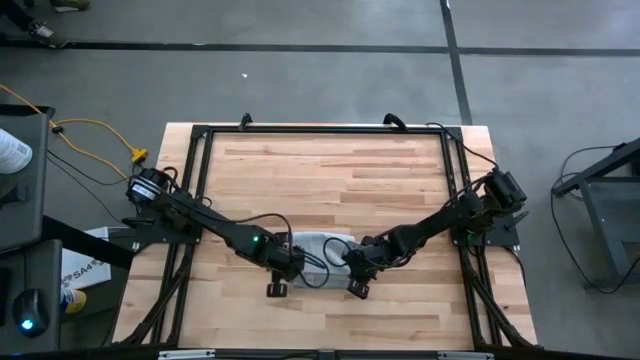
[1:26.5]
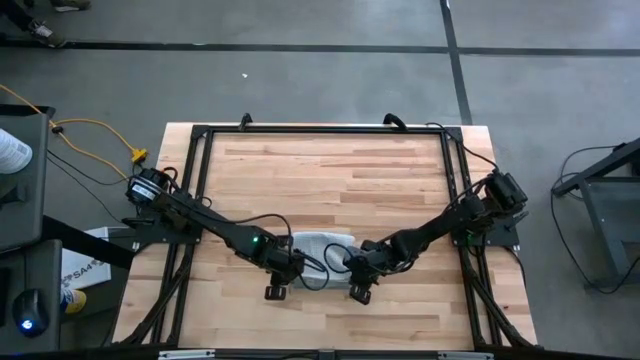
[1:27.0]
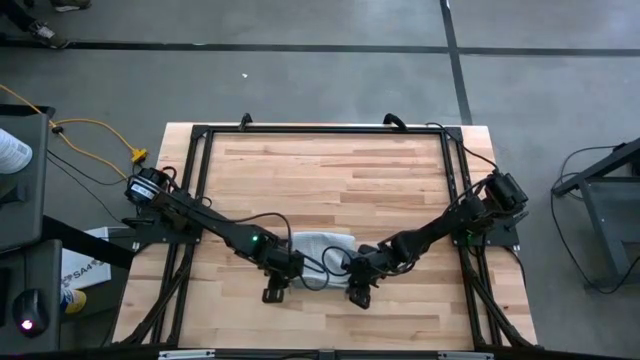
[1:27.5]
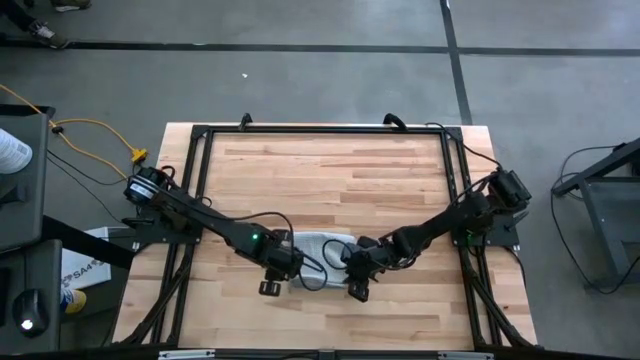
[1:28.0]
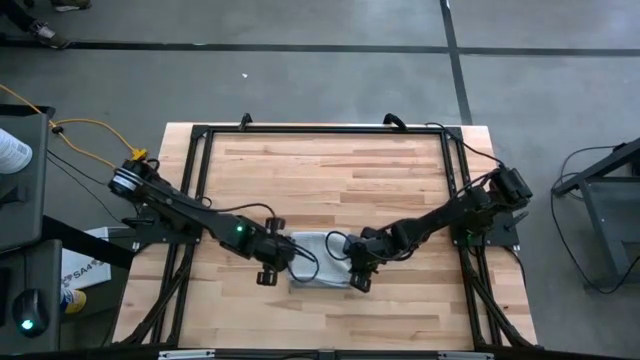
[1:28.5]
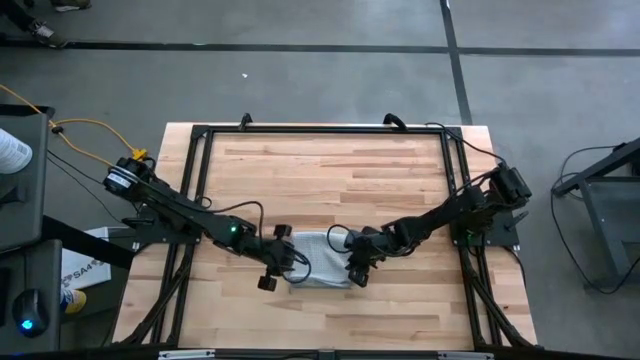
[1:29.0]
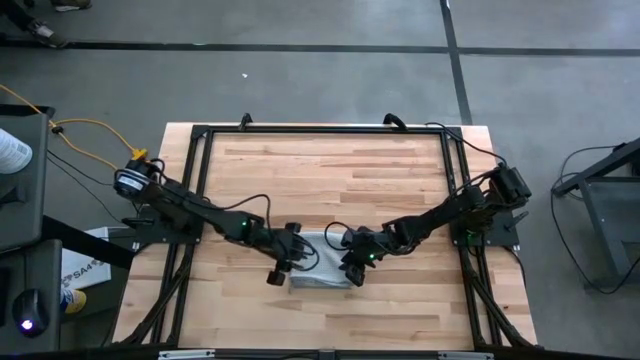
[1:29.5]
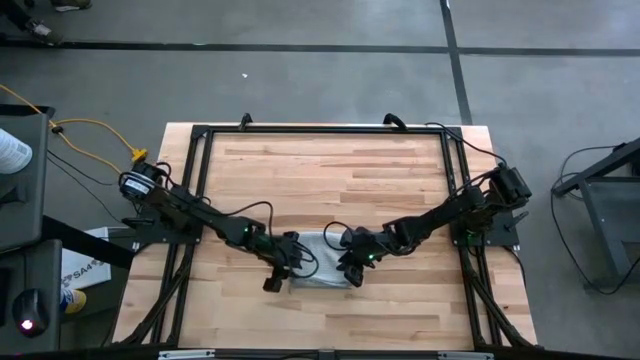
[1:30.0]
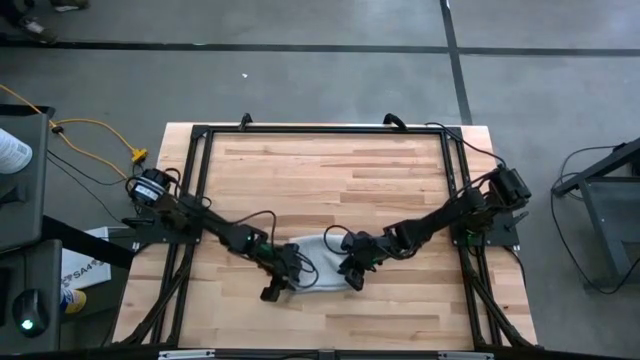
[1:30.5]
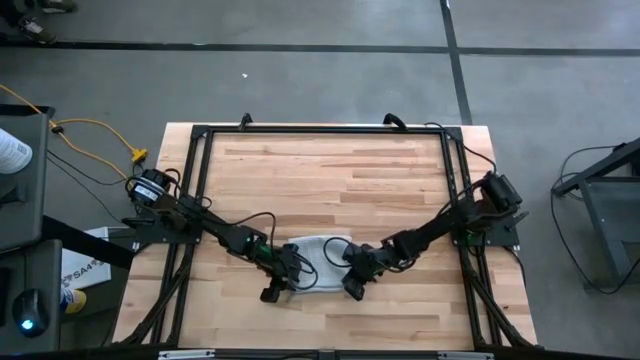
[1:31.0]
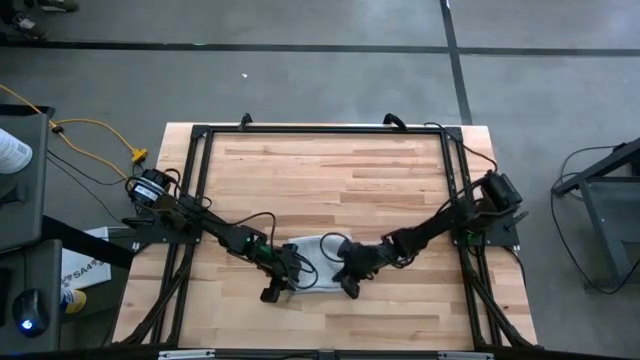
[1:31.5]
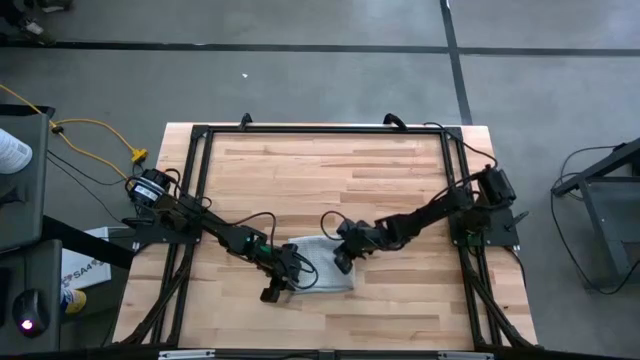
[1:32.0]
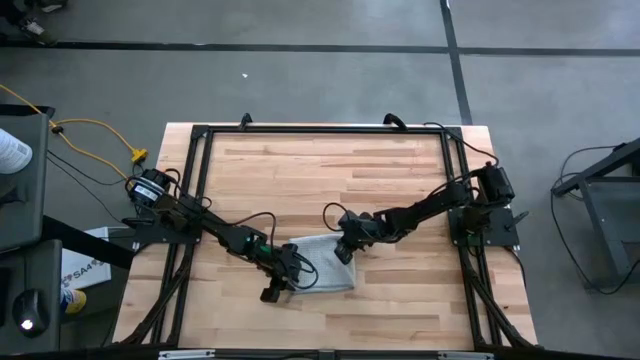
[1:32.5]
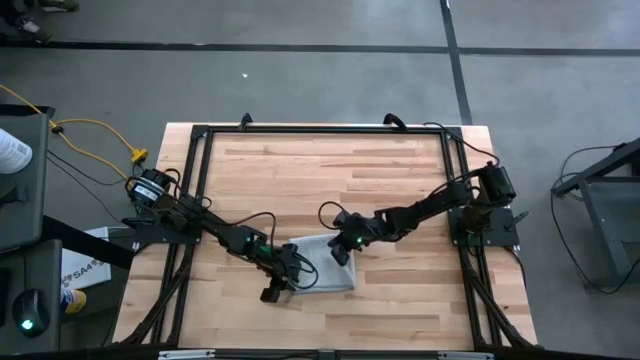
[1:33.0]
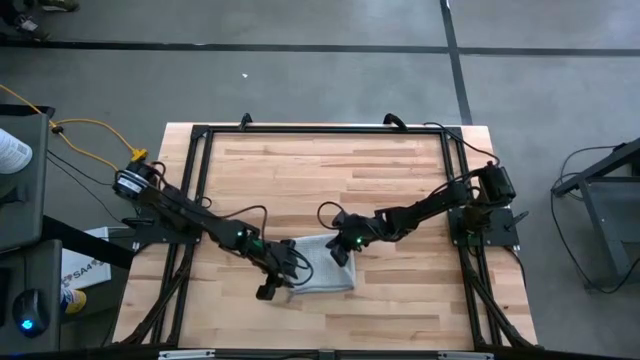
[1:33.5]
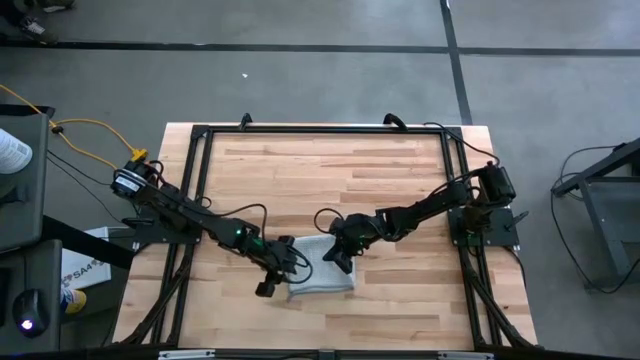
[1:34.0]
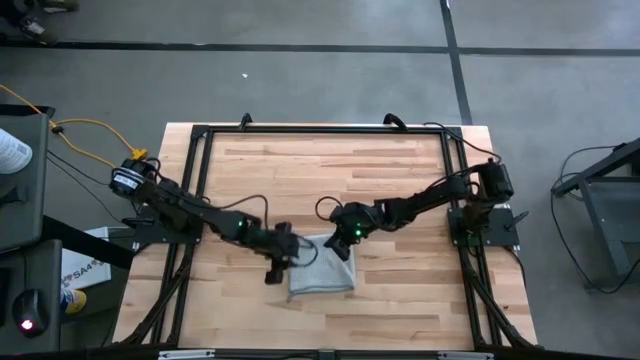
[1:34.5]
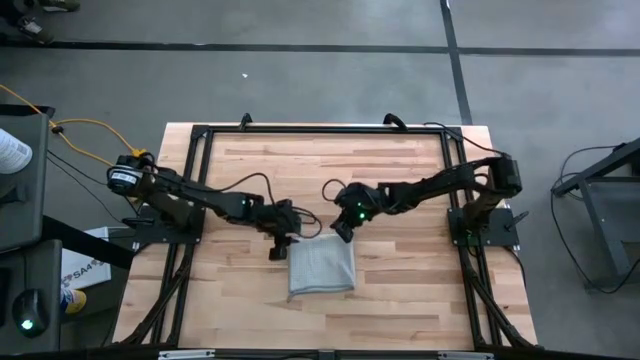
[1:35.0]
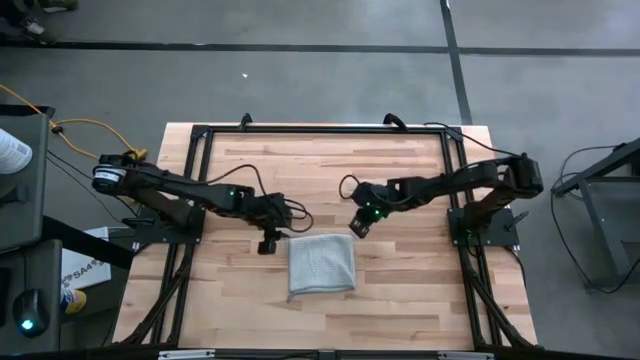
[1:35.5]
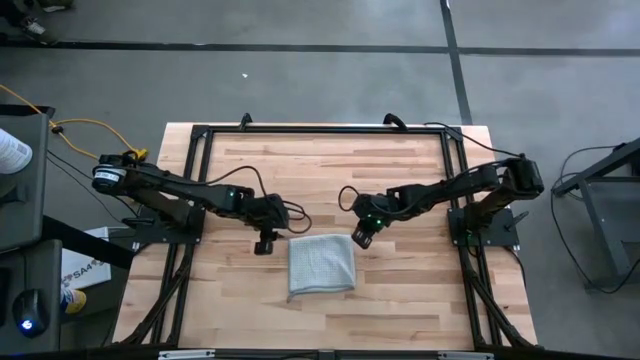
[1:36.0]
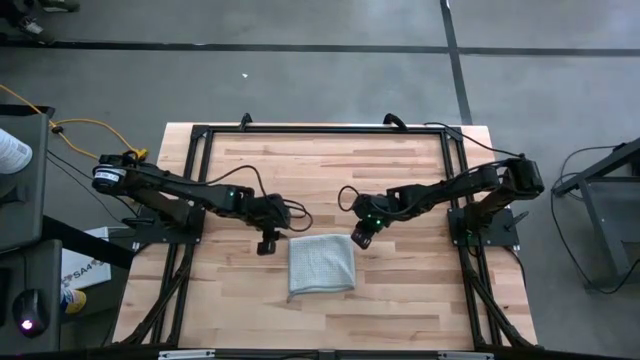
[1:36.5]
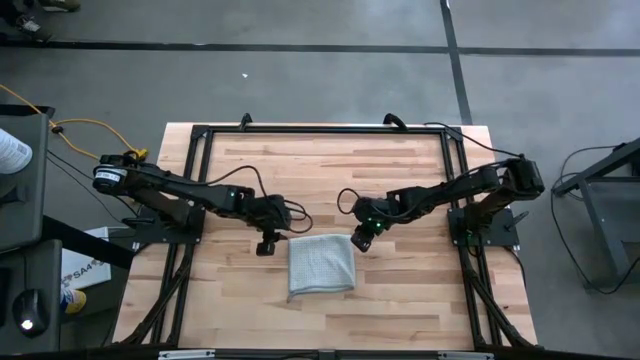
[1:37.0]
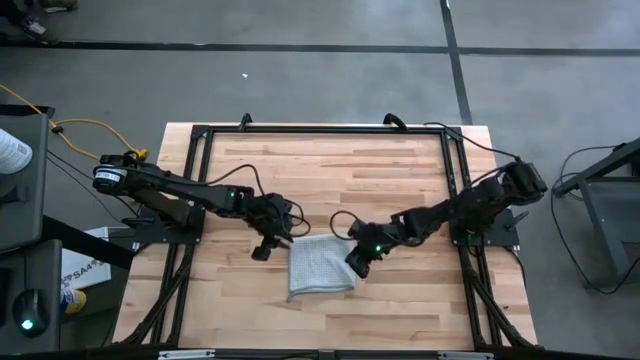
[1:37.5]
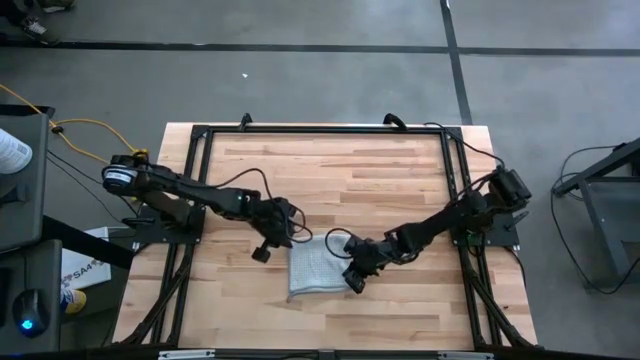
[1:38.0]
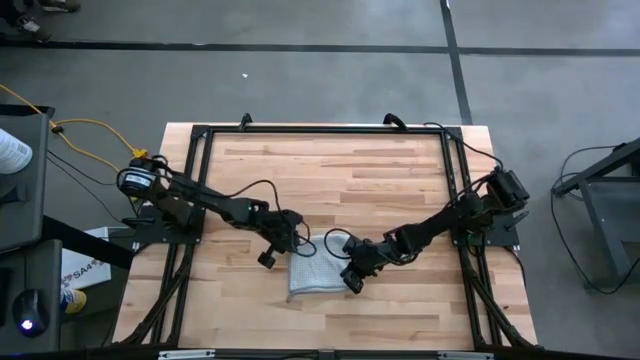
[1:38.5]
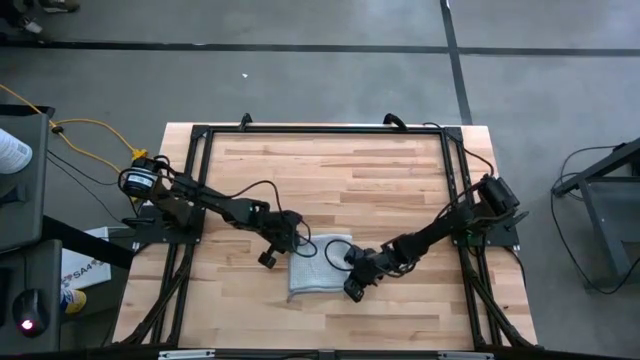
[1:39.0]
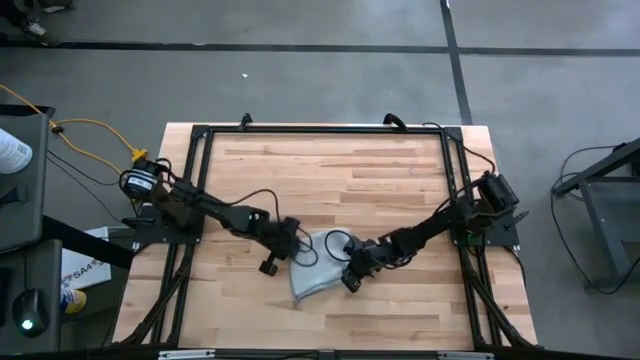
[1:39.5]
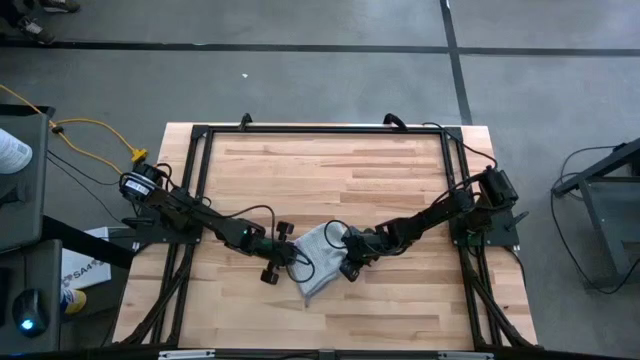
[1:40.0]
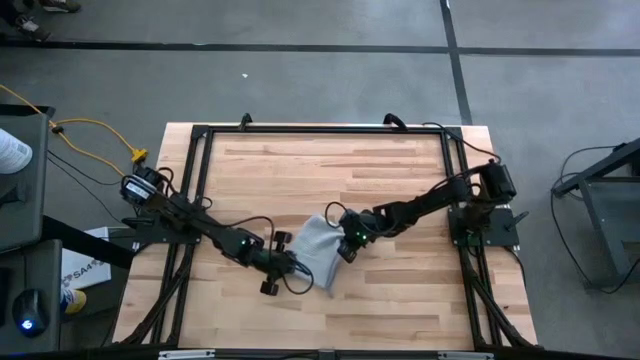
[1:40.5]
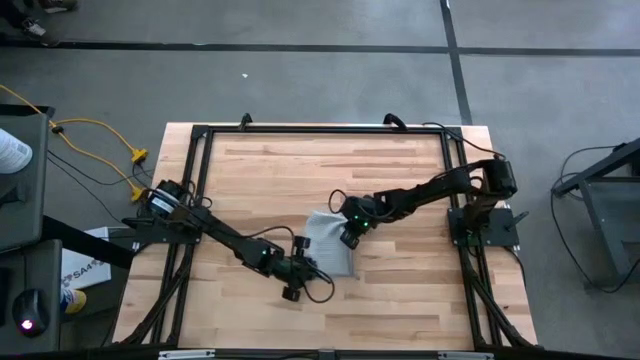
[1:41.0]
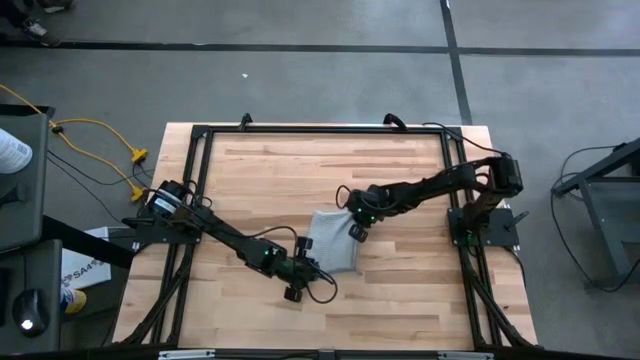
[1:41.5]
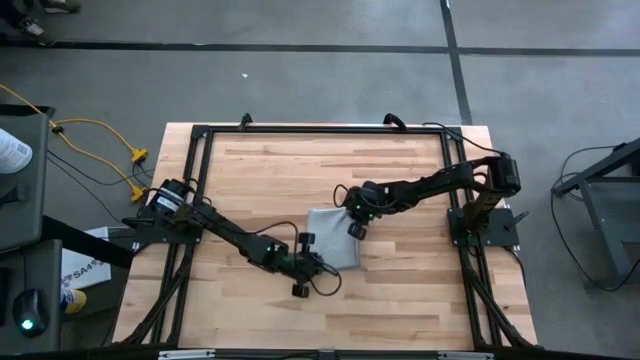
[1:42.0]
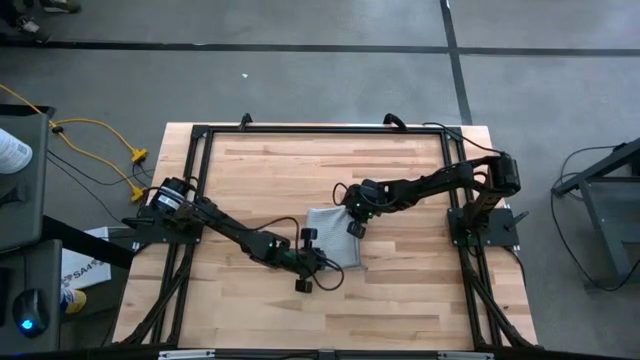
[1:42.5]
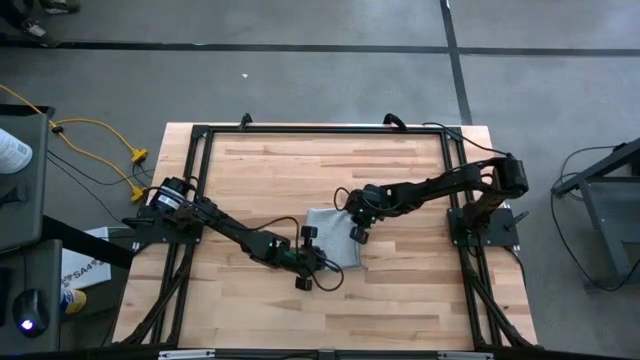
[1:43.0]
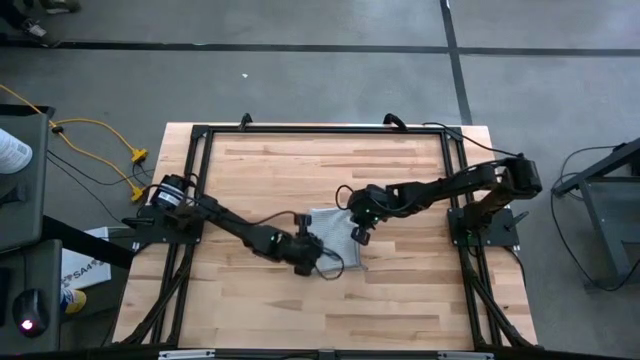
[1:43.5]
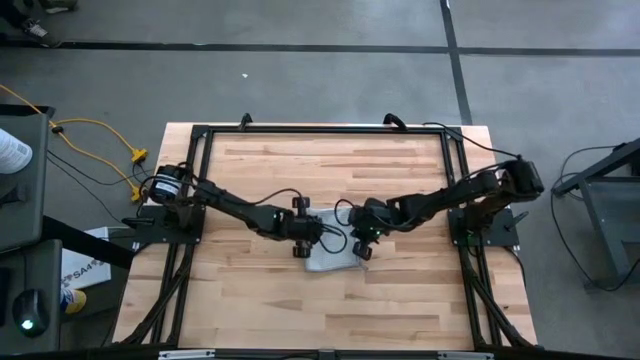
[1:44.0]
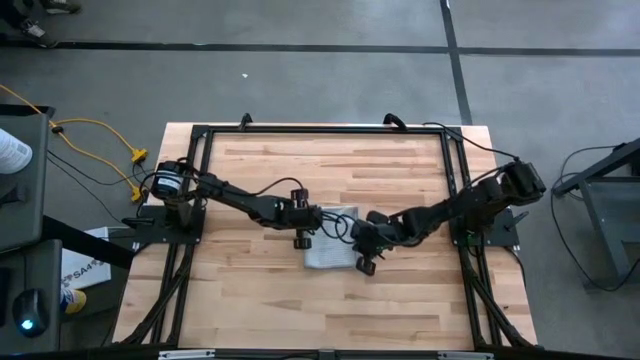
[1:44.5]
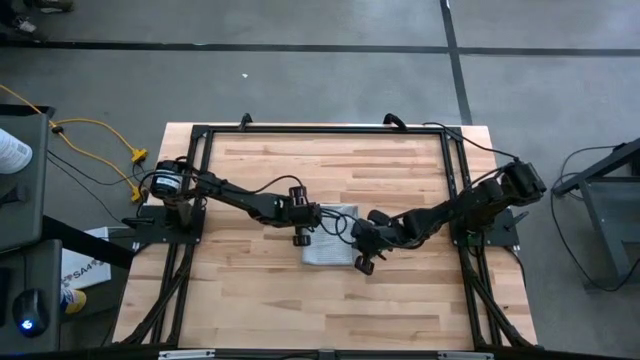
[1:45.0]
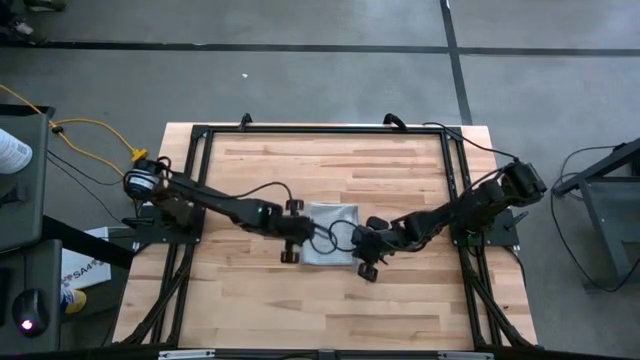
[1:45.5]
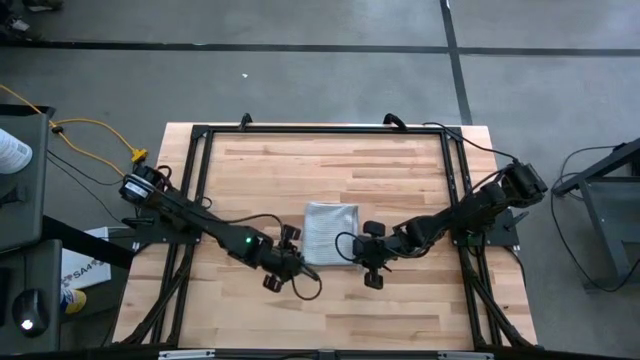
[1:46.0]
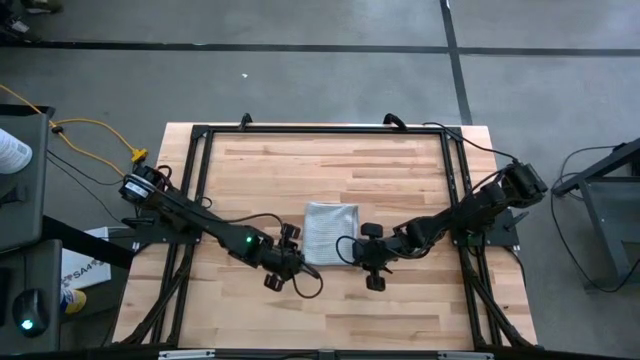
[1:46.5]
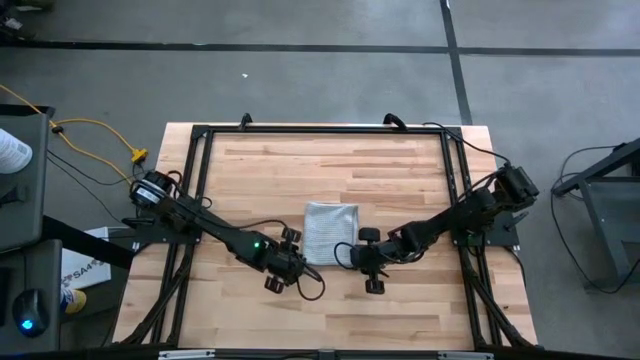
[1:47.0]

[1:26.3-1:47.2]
Task: Fold microfiber towels
Fold the gray towel
